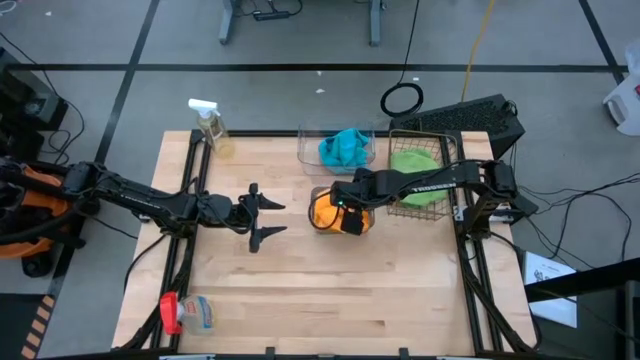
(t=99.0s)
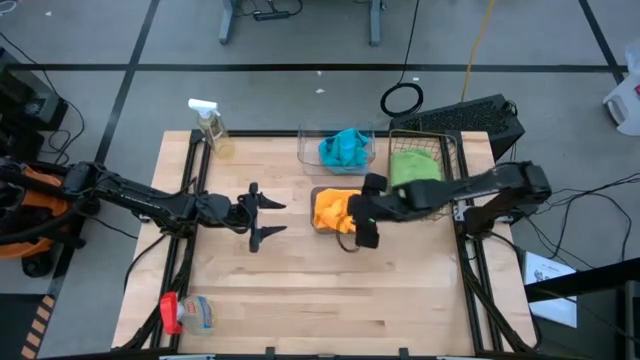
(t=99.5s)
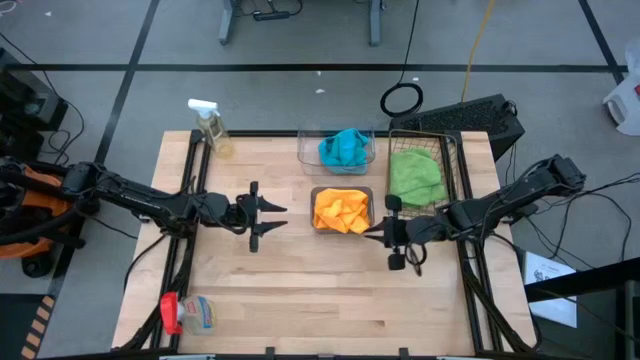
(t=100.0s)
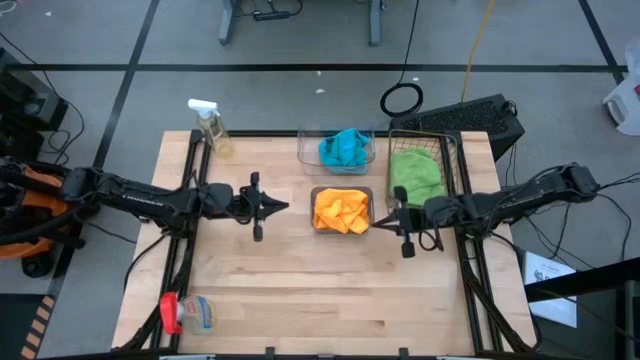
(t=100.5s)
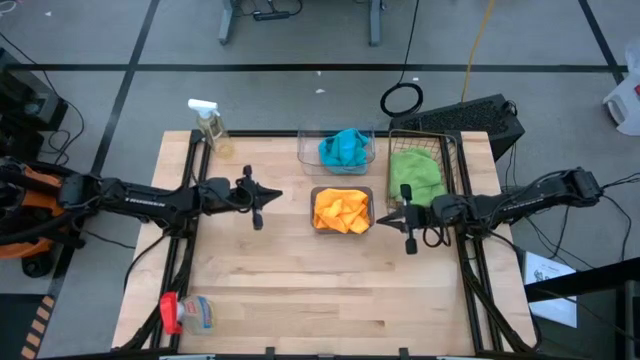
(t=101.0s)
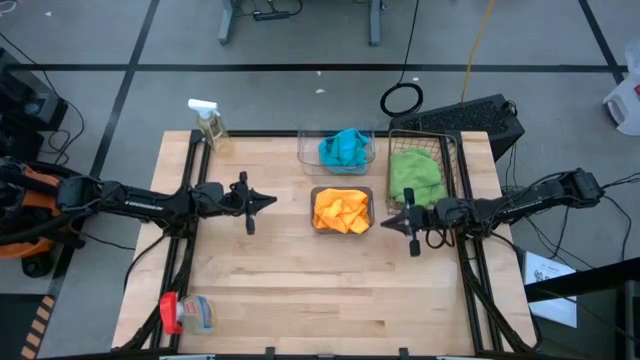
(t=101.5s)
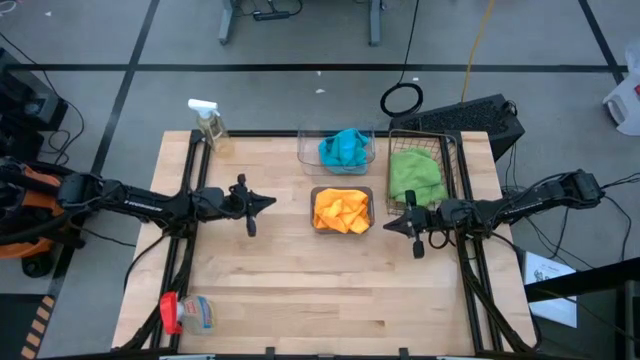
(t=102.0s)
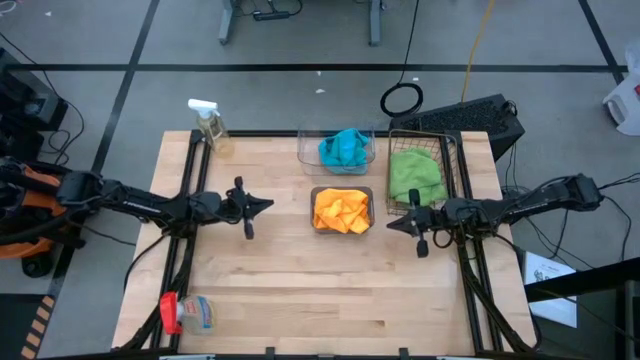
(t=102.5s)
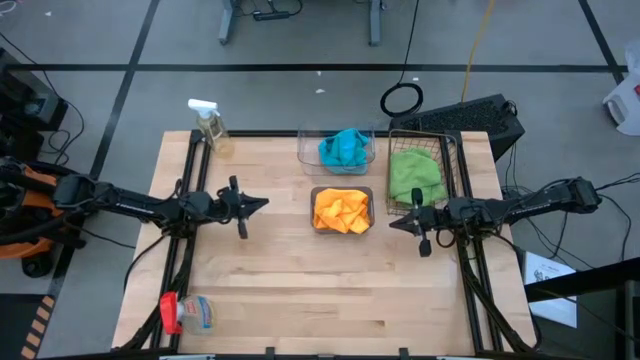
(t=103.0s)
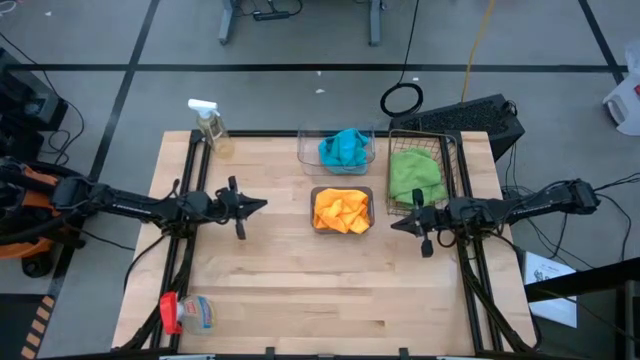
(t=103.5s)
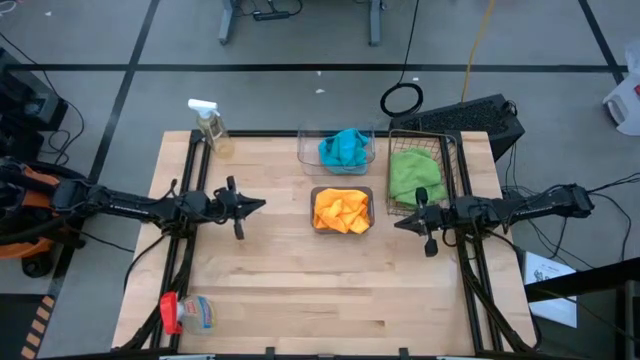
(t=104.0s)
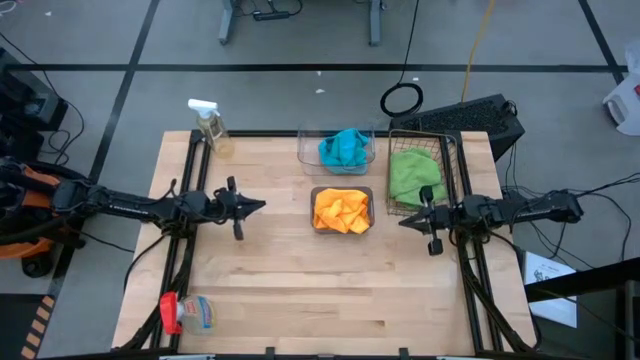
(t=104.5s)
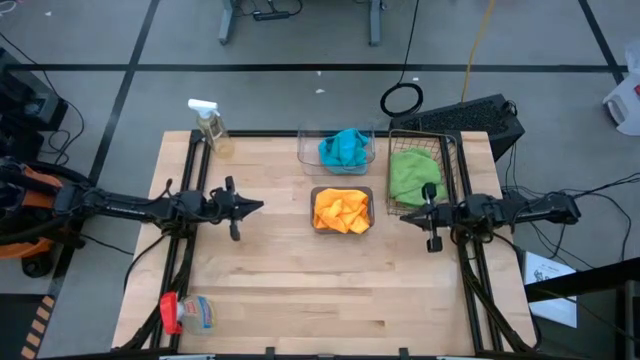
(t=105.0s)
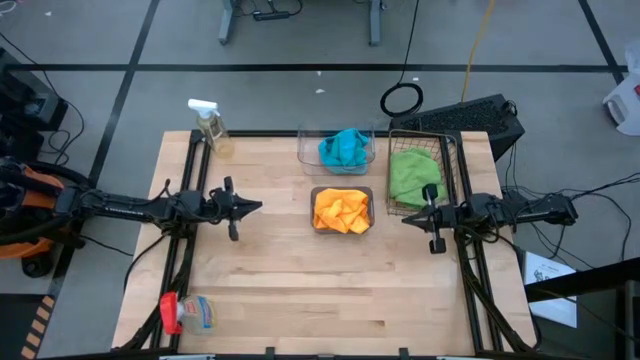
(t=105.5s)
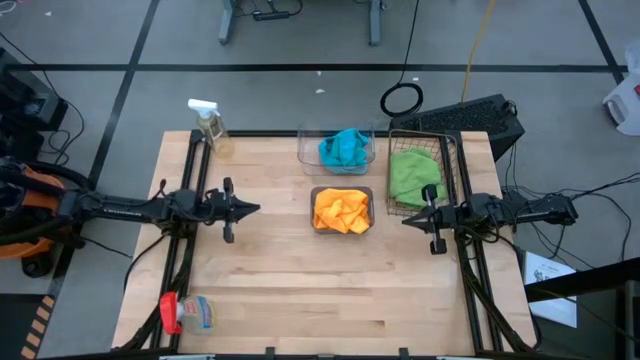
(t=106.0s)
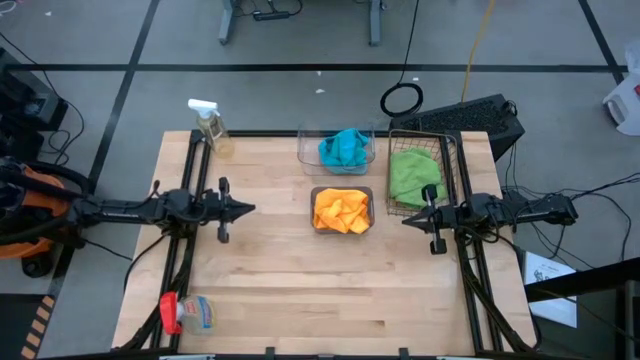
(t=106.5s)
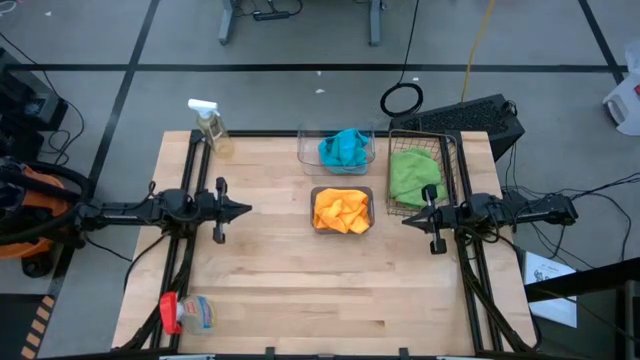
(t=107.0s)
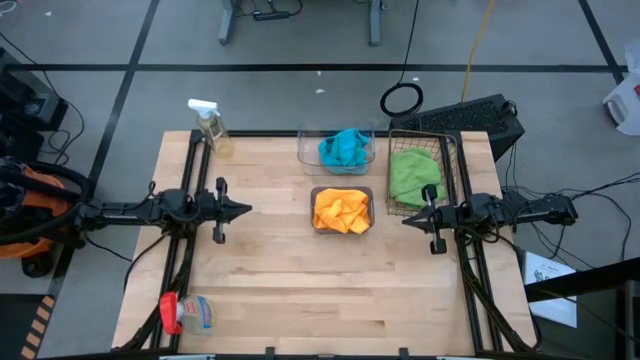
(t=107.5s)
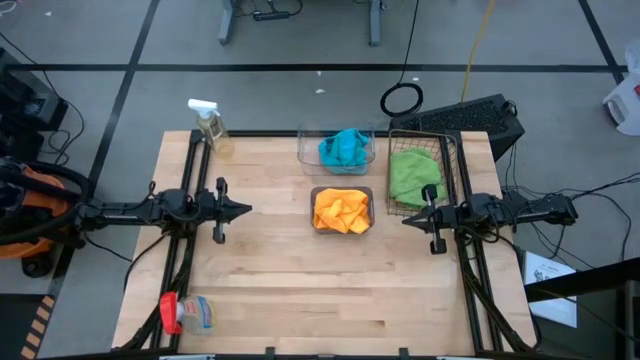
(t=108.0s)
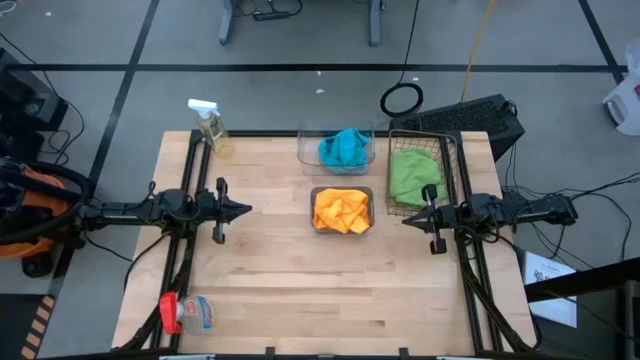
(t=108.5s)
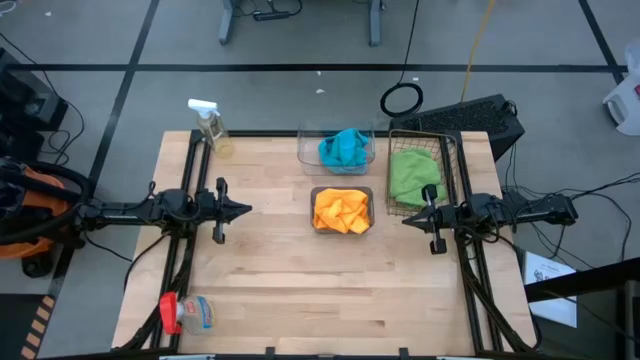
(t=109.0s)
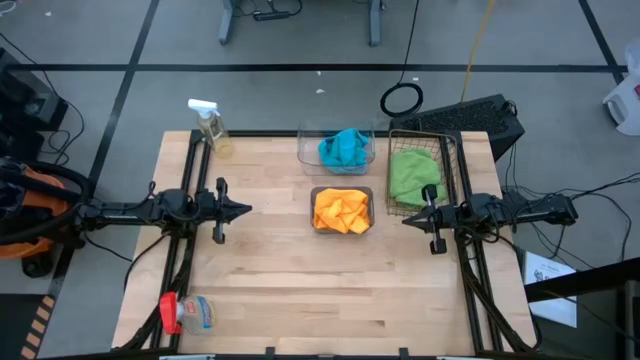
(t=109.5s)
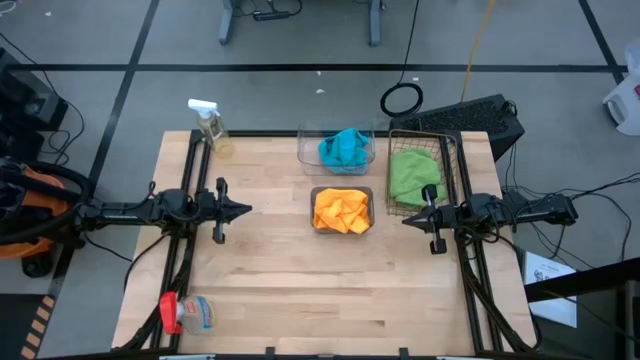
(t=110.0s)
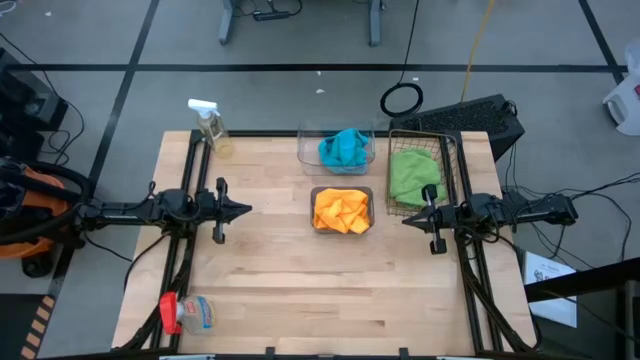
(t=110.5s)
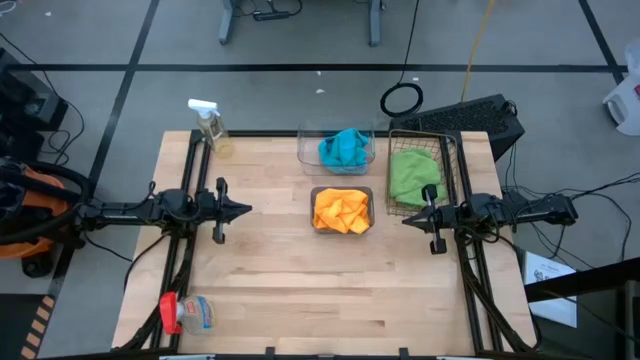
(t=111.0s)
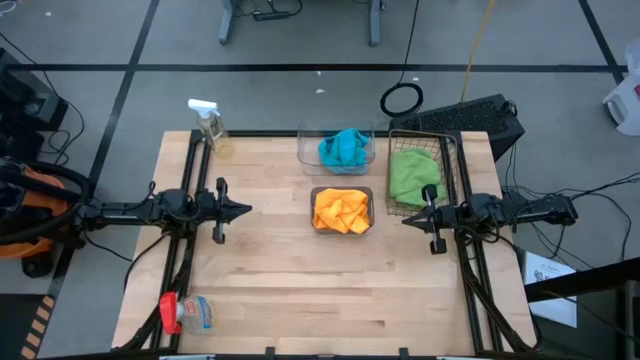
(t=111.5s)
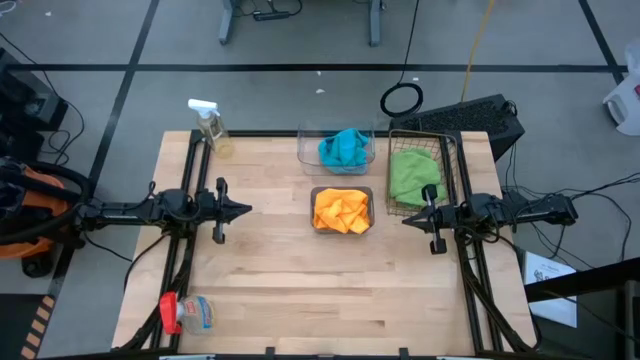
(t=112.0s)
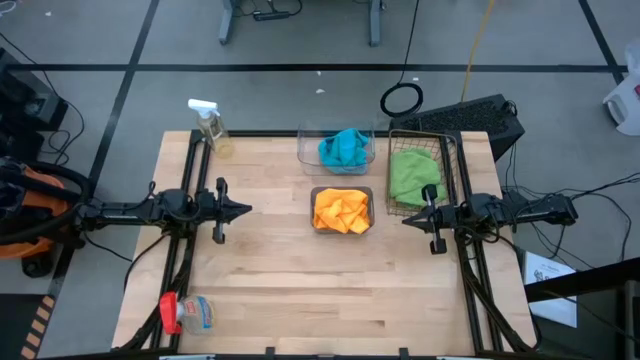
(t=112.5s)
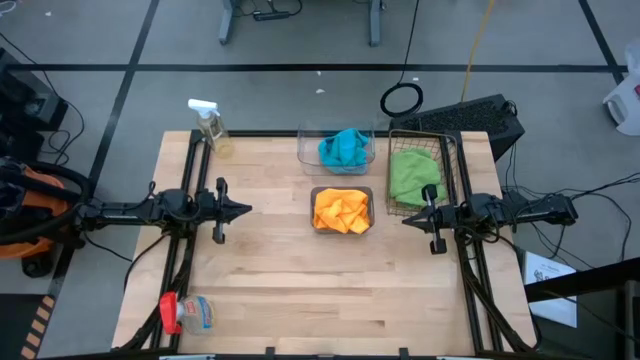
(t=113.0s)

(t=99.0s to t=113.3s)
Task: Sort microfiber towel by color & place in baskets
Return to Home Position

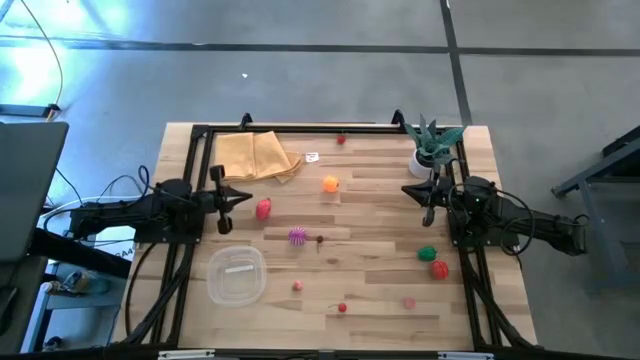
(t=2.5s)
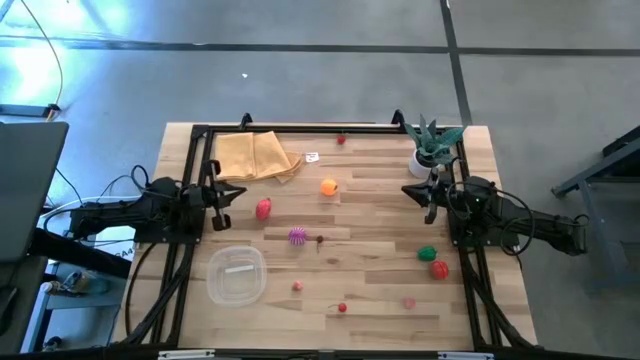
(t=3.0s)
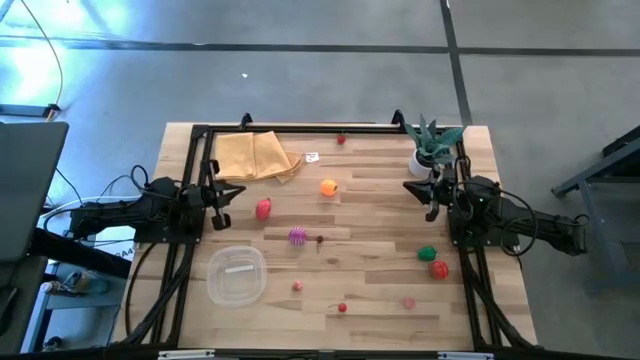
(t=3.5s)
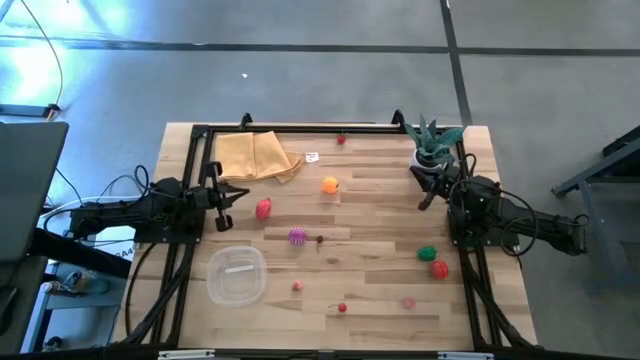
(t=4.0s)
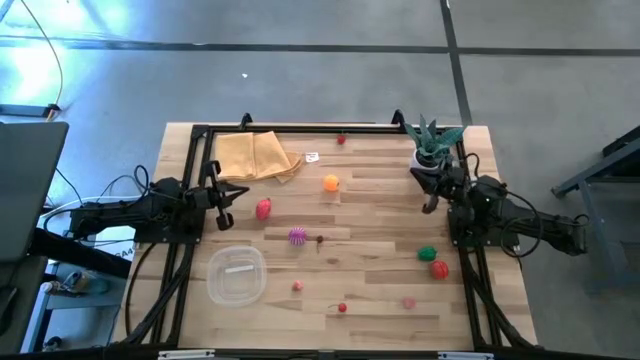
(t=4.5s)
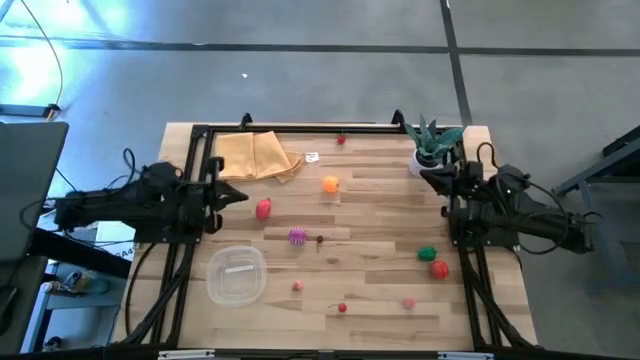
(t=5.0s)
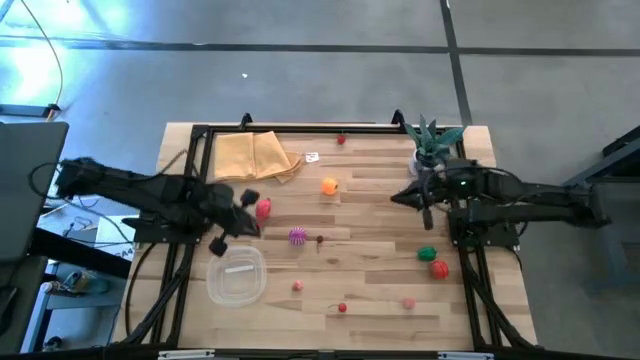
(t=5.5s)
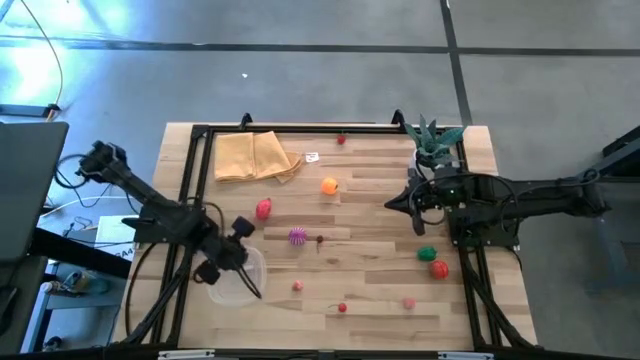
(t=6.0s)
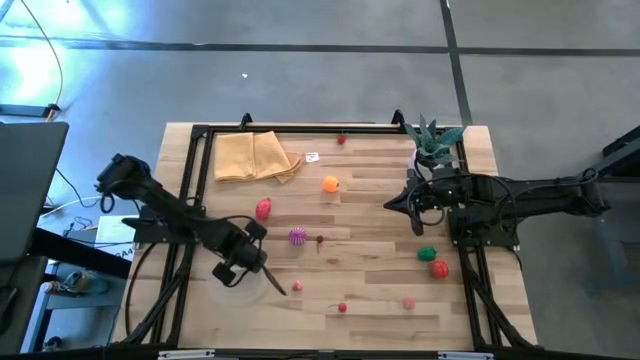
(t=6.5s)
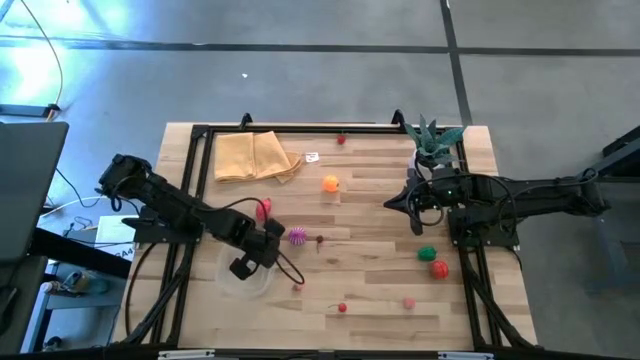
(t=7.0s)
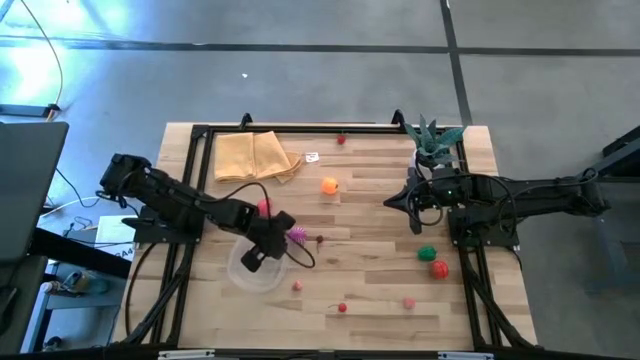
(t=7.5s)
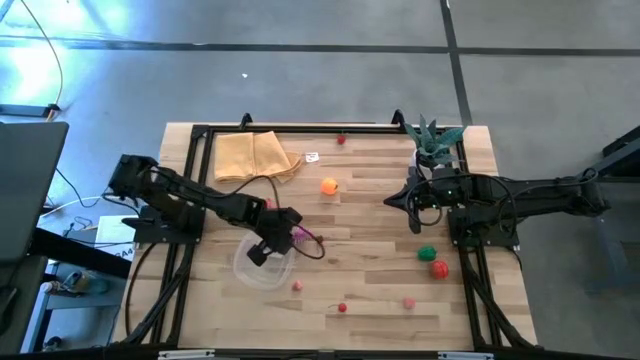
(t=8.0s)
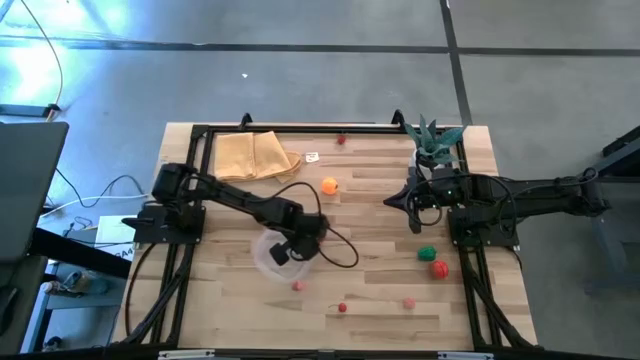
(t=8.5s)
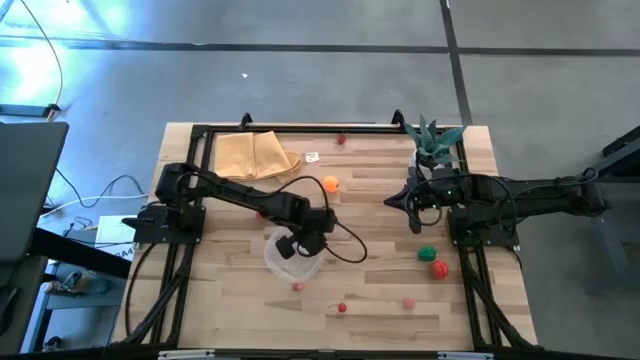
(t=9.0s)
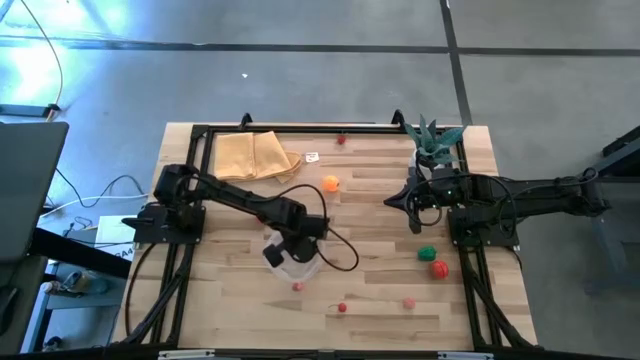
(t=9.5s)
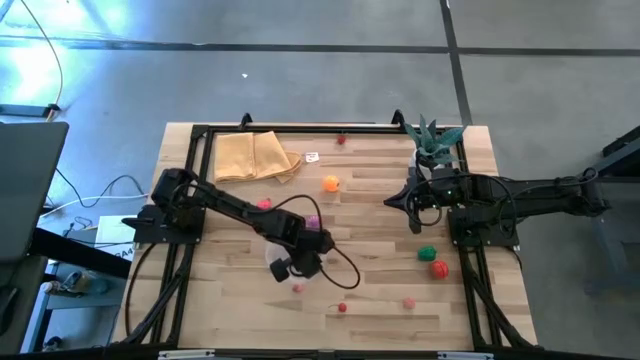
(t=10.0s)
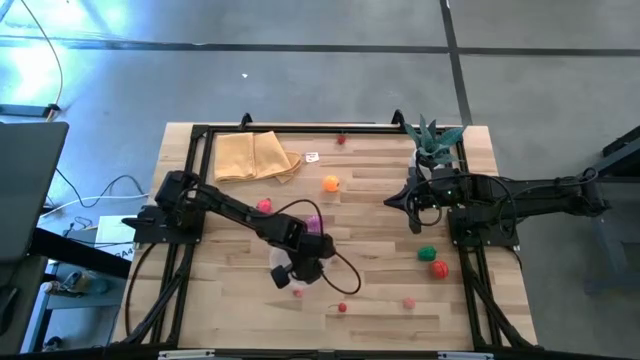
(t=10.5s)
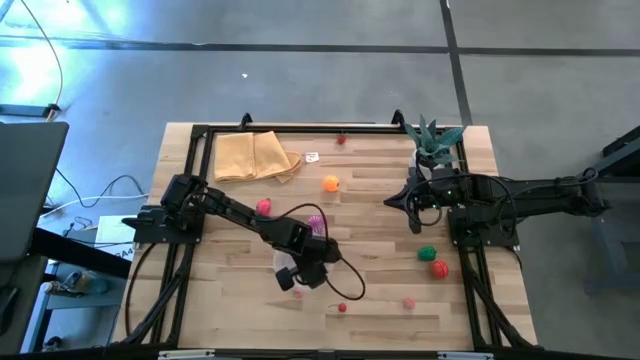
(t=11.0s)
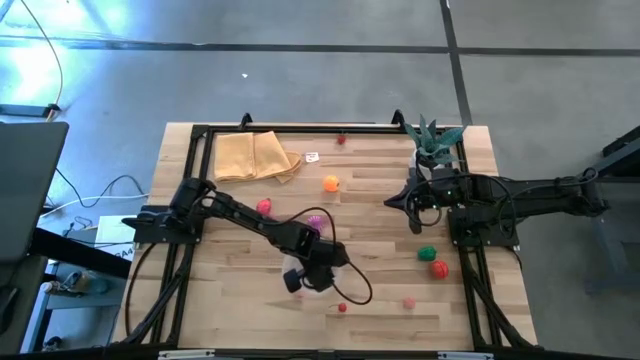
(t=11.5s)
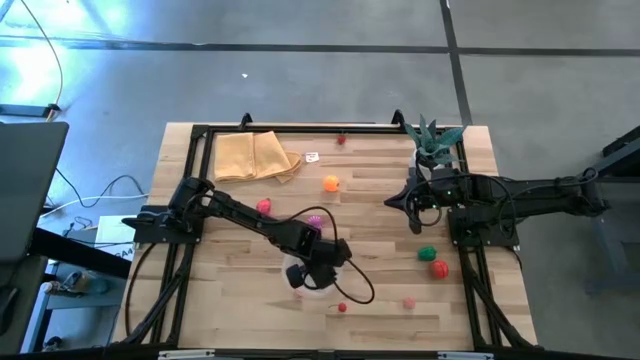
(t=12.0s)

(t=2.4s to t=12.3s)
Task: Pick and placing Produce into tupperware
Move the bin to the center of the table
